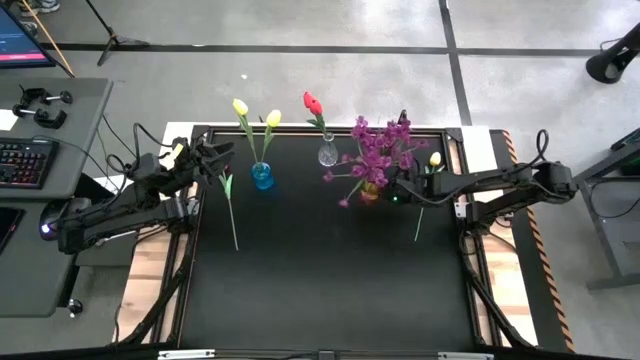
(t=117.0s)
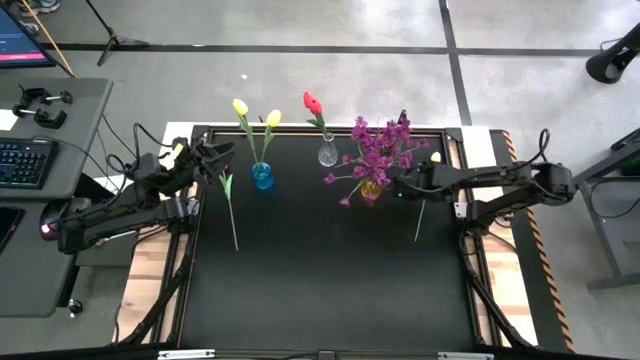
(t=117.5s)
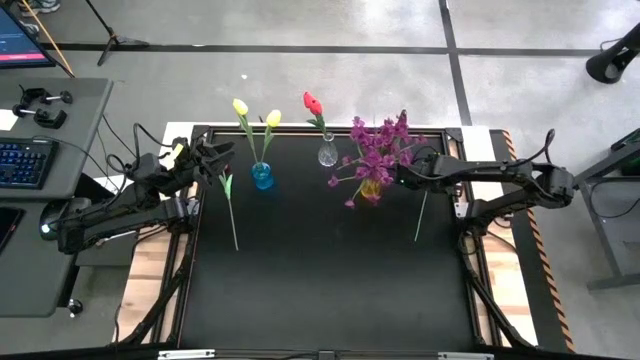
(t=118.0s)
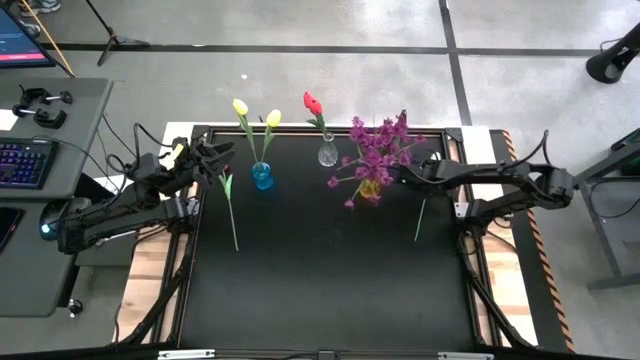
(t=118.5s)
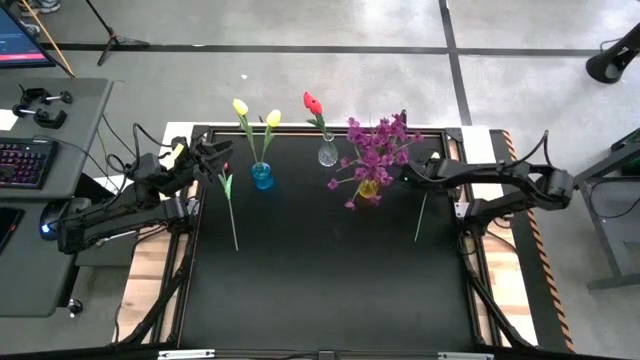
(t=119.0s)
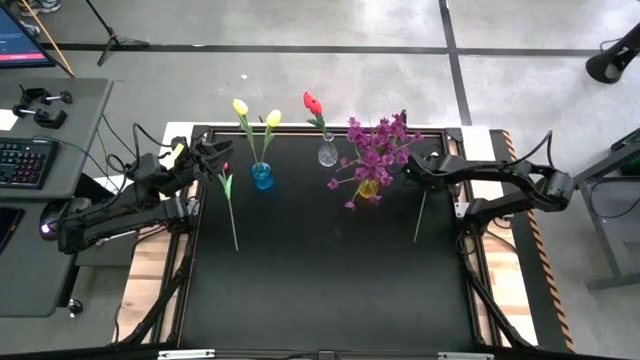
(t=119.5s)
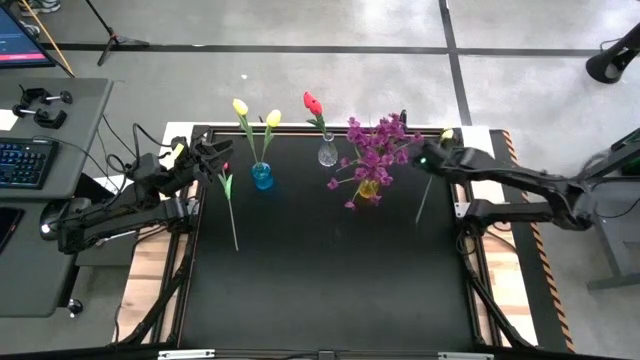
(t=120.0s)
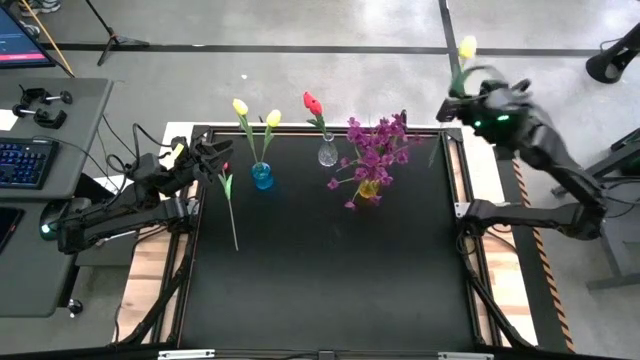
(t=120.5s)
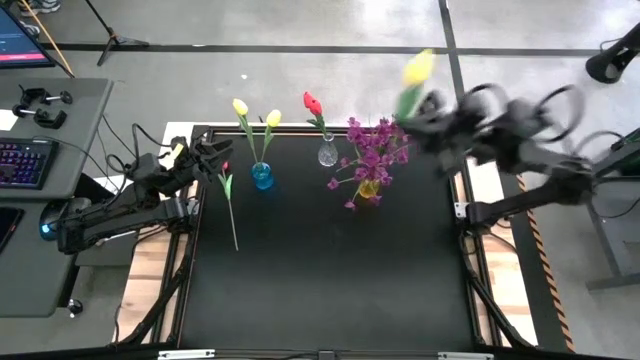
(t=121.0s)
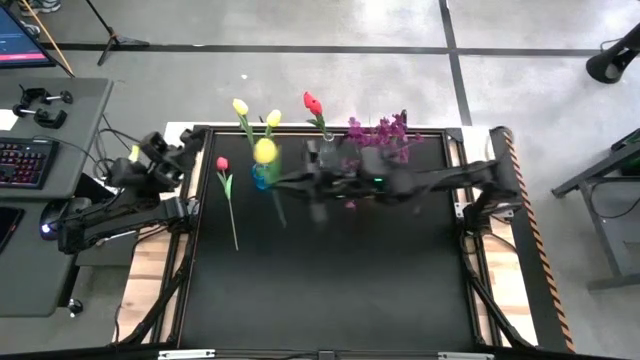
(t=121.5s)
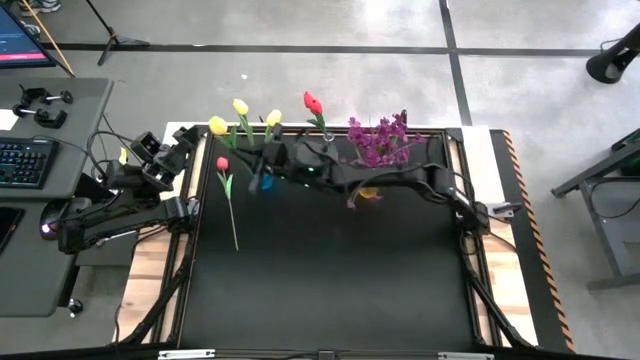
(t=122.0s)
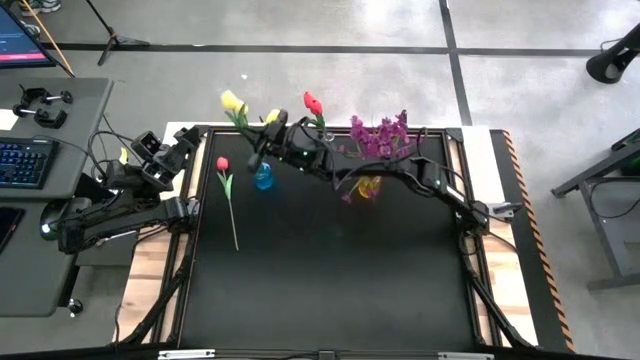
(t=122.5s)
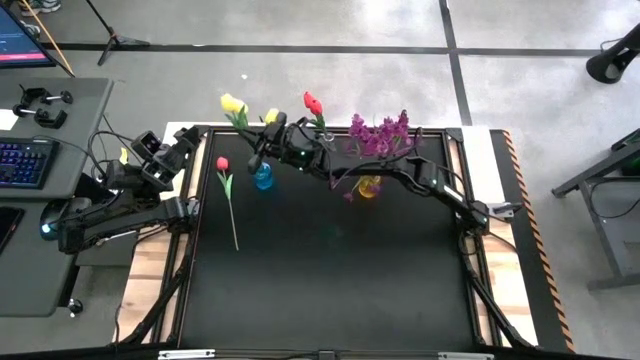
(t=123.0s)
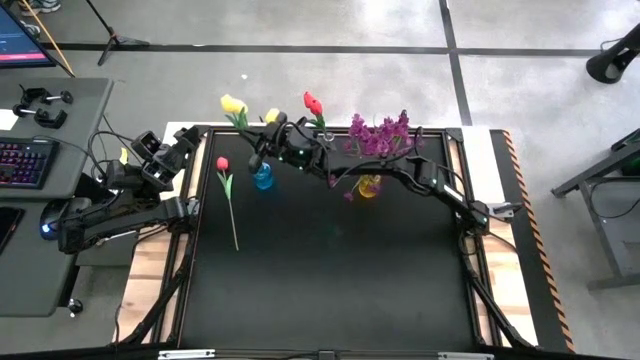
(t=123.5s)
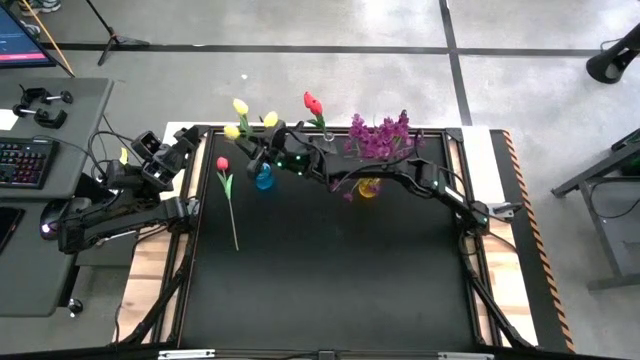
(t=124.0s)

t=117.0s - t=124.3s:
Task: Sort flowers into vase by color
Put the yellow flower into the blue vase

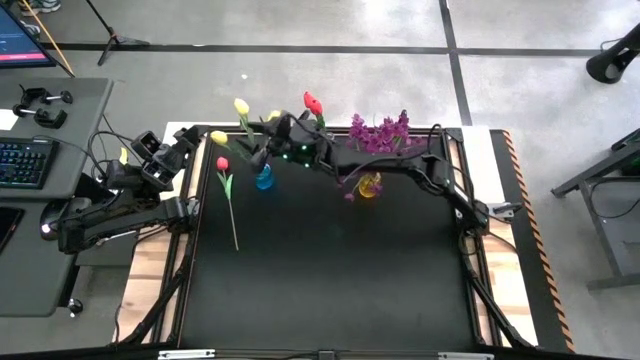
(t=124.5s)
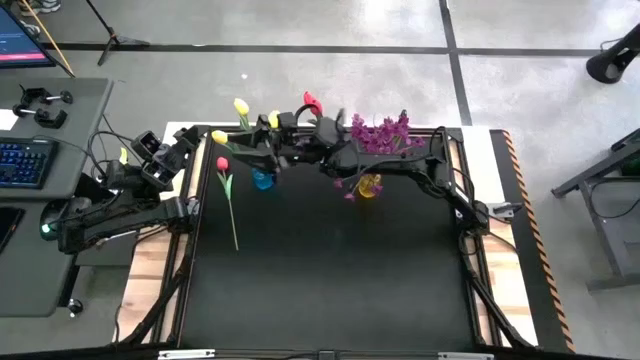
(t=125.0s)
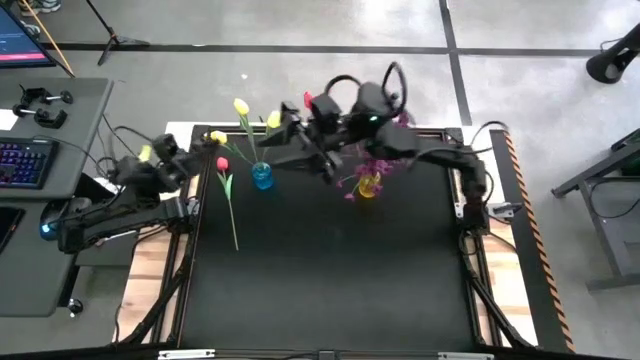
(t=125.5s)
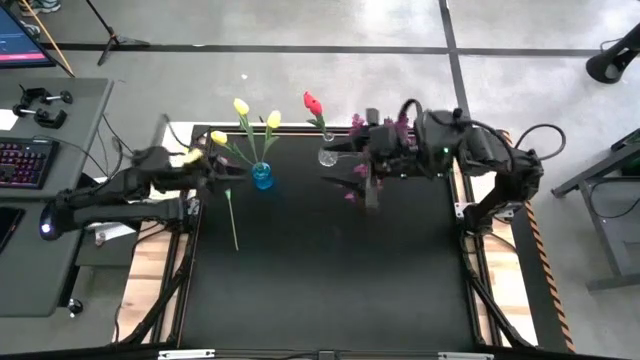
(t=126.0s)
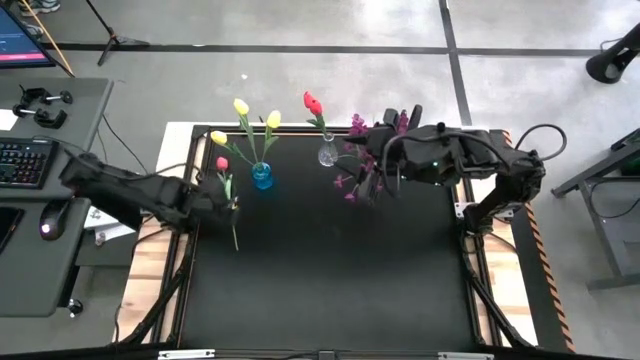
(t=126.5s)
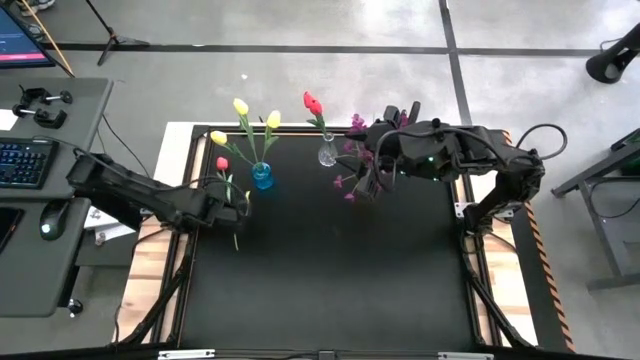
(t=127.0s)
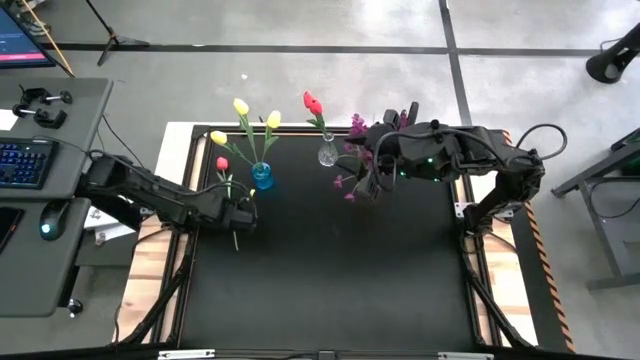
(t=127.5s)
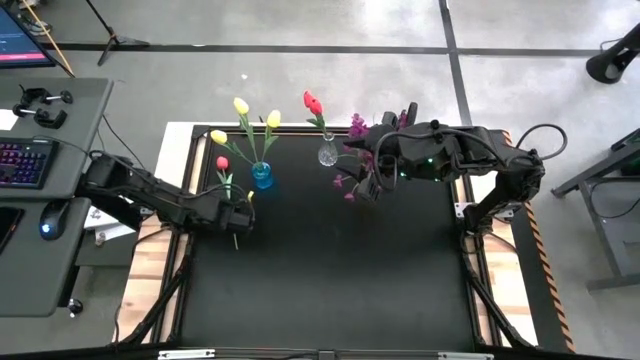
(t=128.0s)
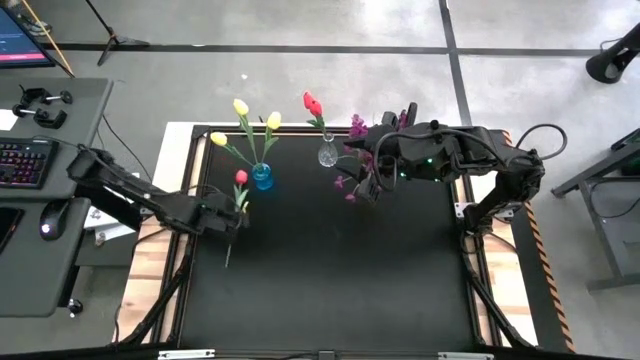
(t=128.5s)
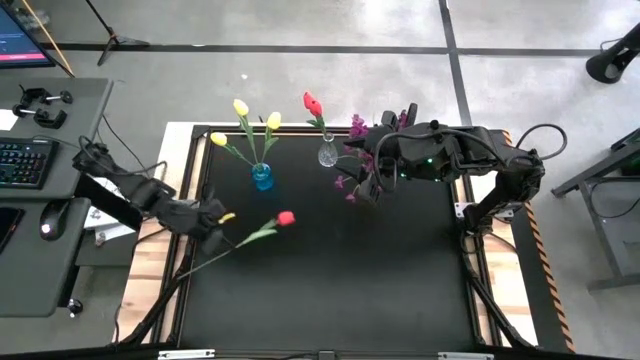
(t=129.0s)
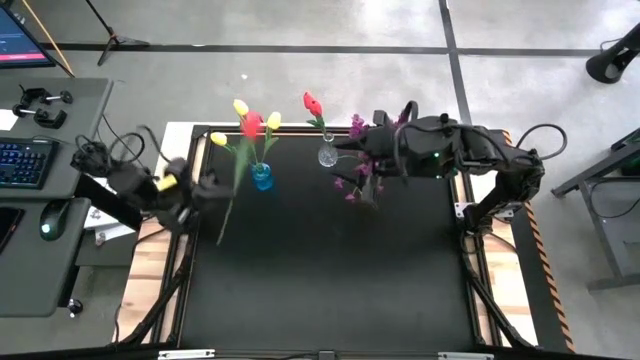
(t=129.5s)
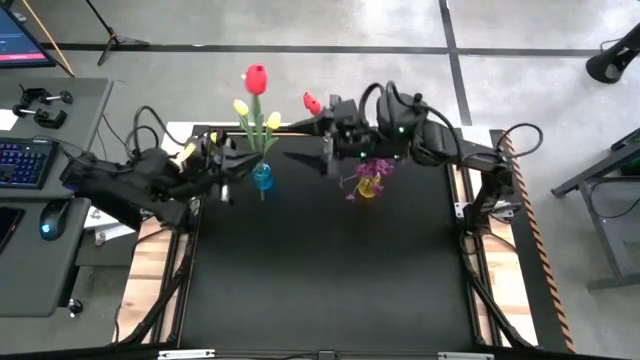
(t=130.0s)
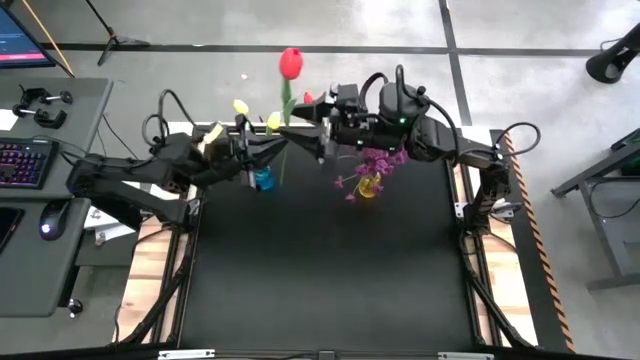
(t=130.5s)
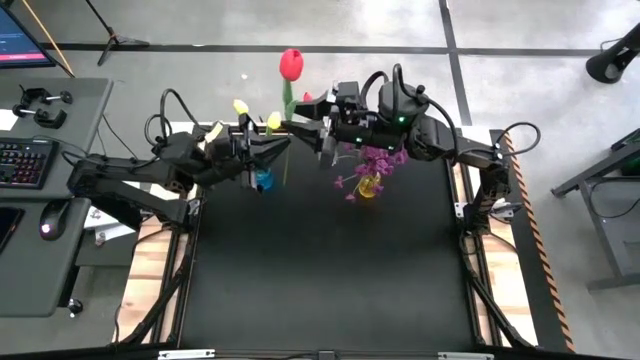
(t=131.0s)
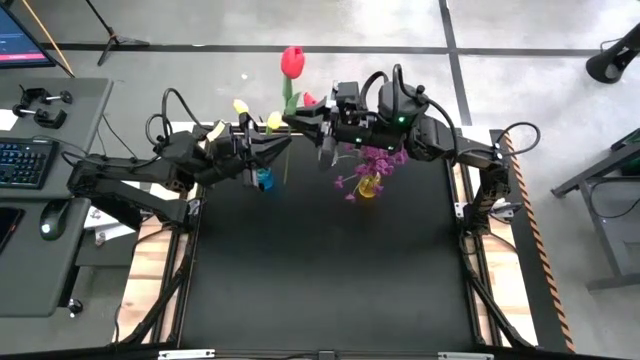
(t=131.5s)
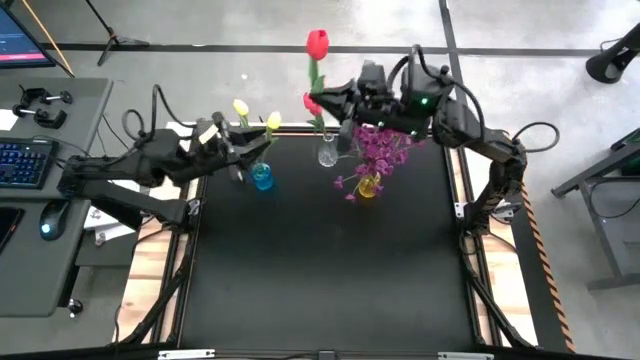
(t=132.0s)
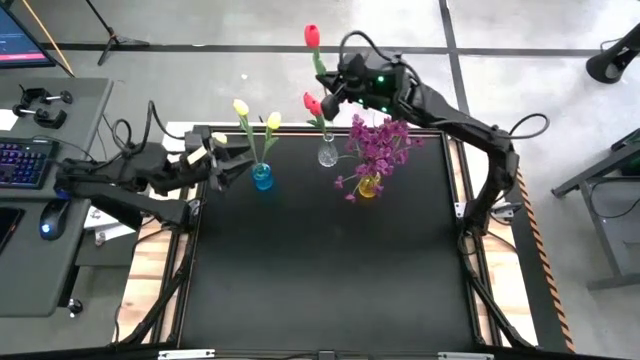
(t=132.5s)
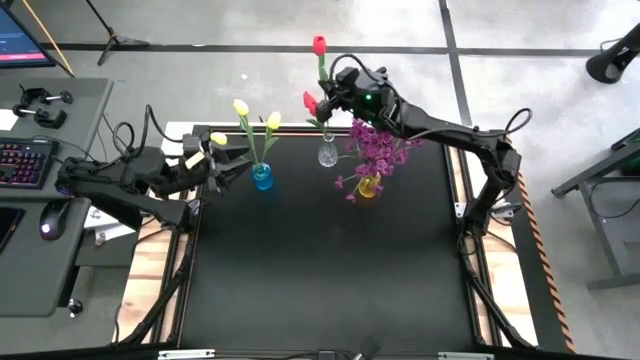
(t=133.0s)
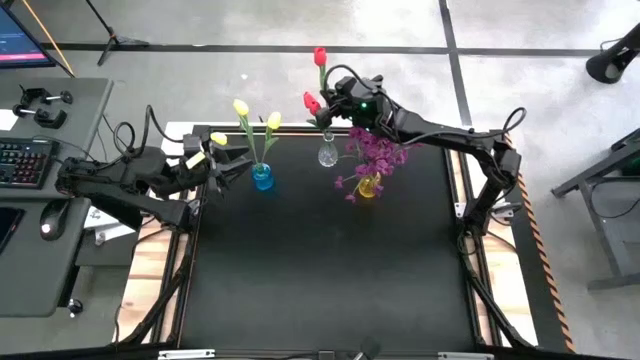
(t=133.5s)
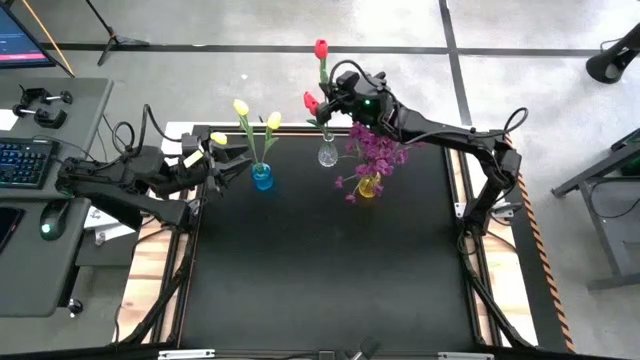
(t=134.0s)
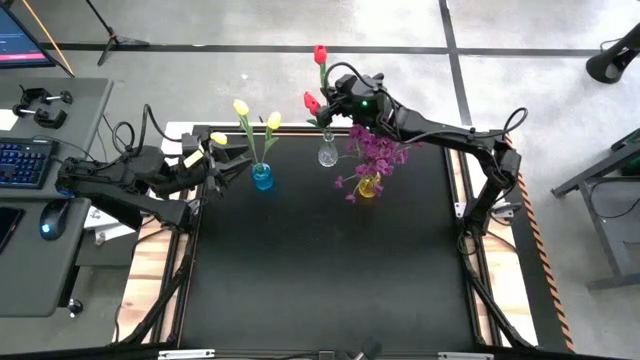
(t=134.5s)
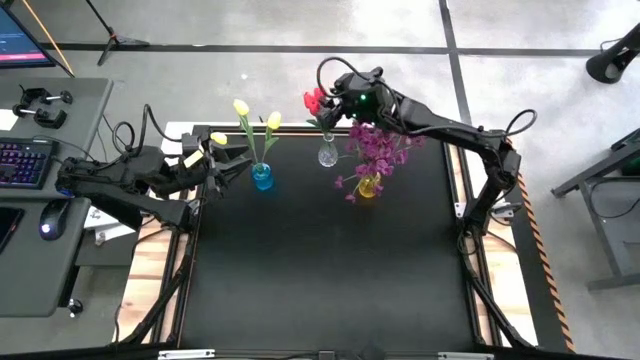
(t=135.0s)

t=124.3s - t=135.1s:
Put the pink flower into the transparent vase

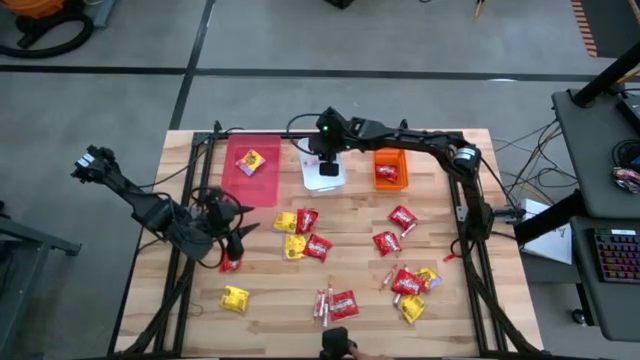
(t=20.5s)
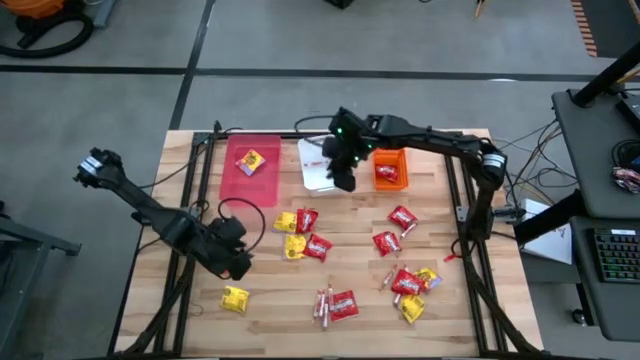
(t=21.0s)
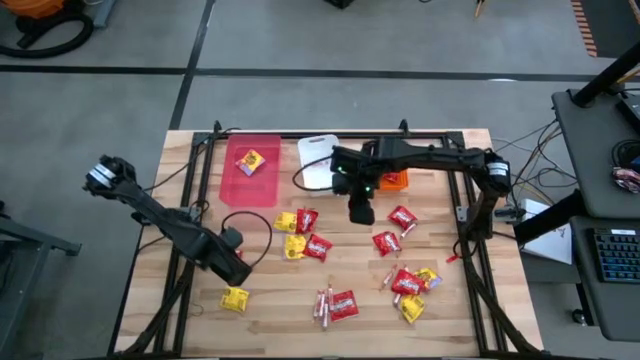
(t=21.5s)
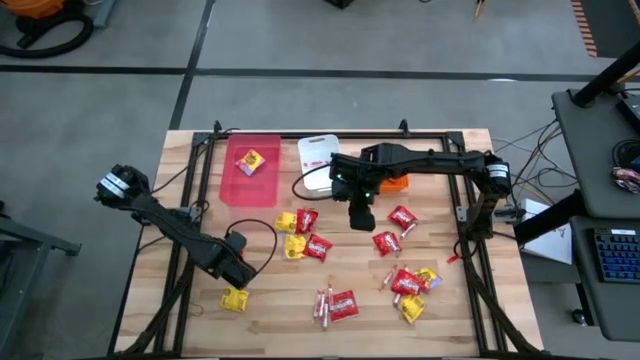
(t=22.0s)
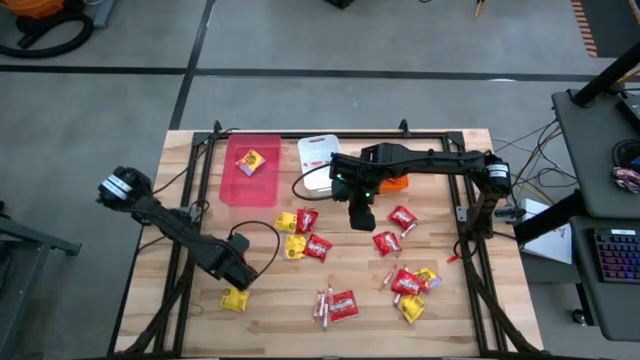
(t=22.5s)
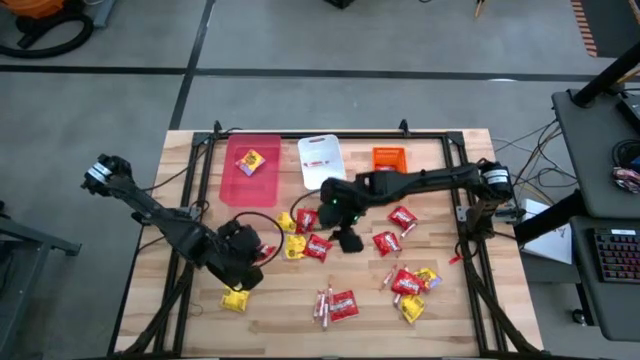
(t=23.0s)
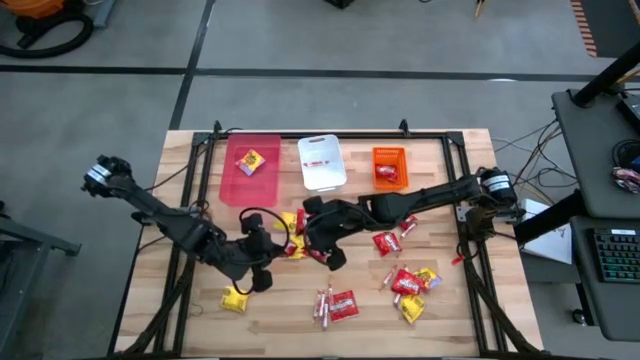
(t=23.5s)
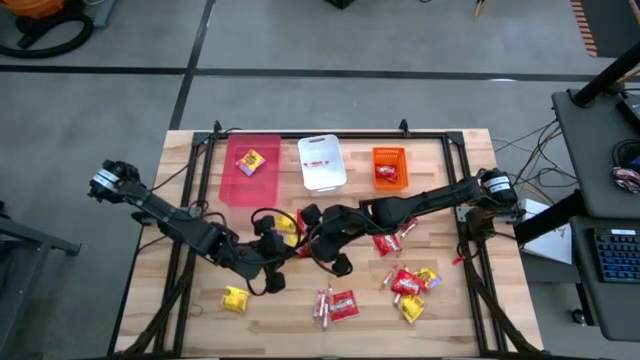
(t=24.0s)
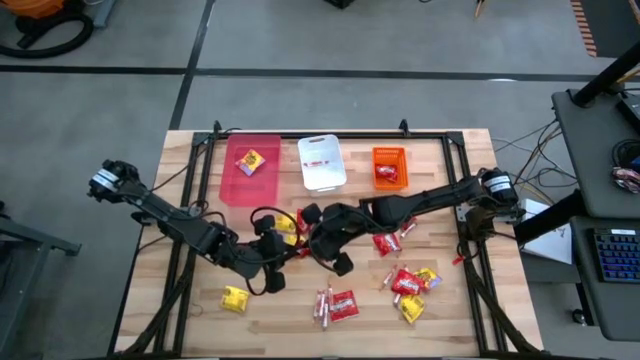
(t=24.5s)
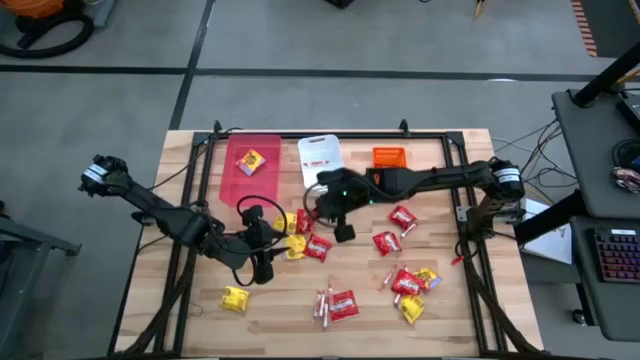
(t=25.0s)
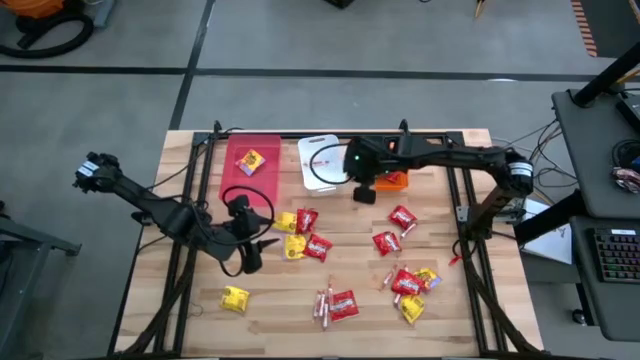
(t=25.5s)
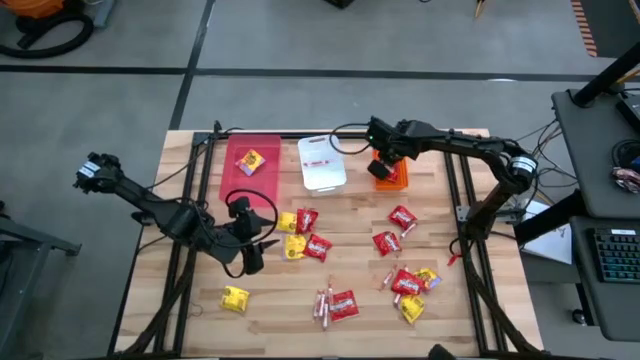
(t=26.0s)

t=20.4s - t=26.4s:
Task: Sort candy
Put the red candy into the orange bin
